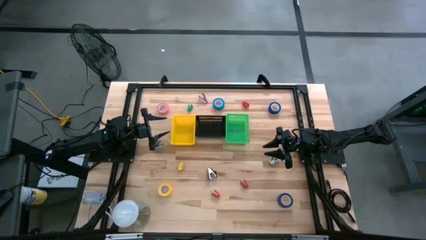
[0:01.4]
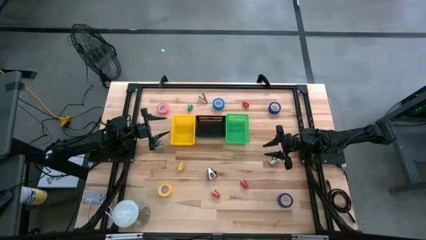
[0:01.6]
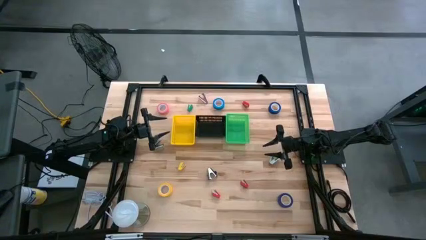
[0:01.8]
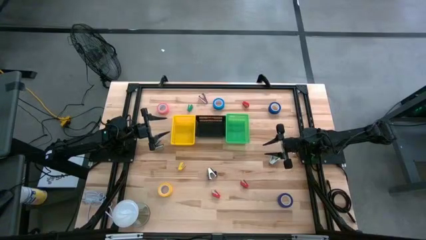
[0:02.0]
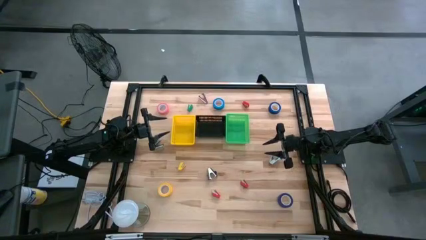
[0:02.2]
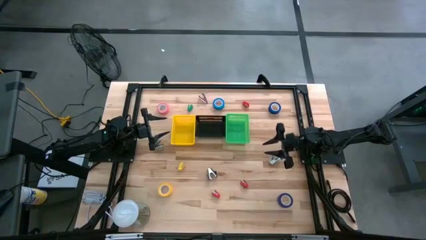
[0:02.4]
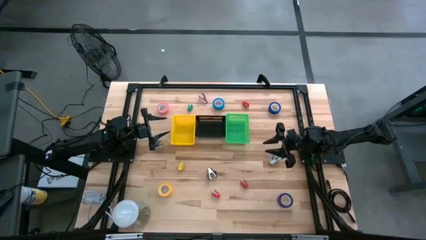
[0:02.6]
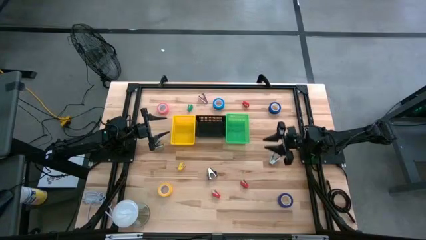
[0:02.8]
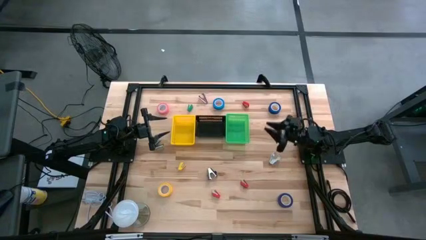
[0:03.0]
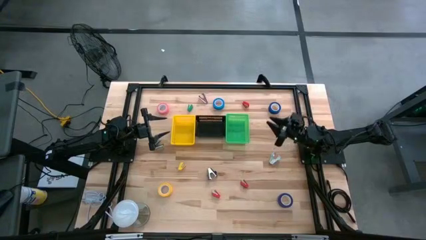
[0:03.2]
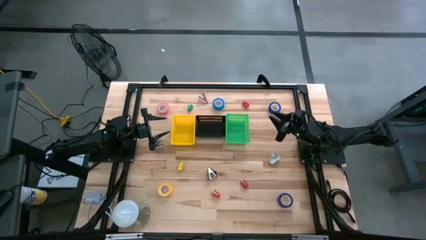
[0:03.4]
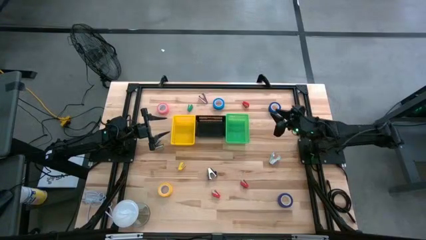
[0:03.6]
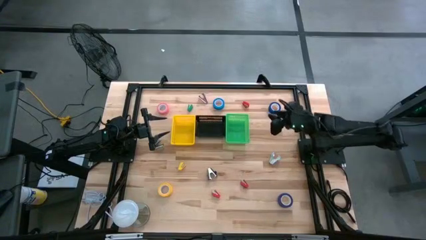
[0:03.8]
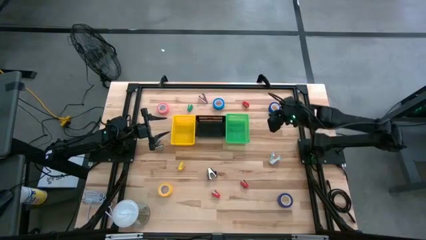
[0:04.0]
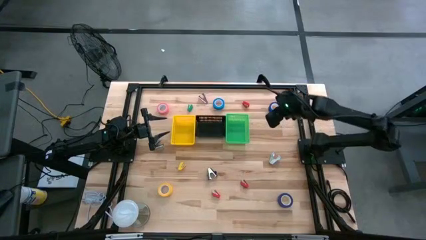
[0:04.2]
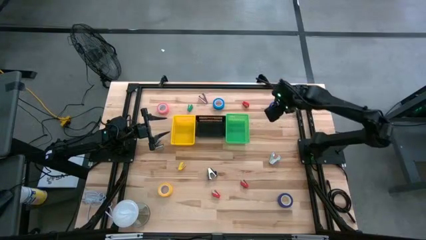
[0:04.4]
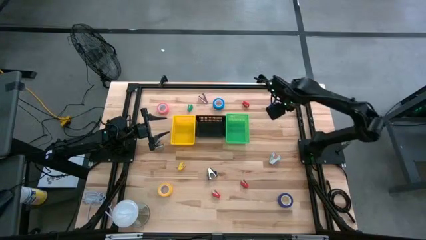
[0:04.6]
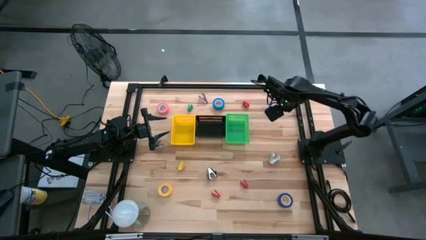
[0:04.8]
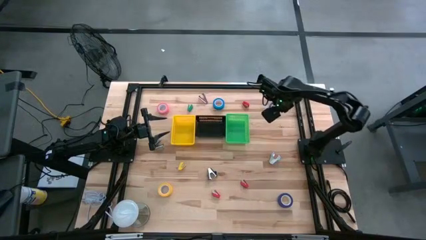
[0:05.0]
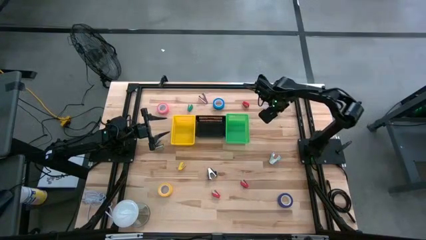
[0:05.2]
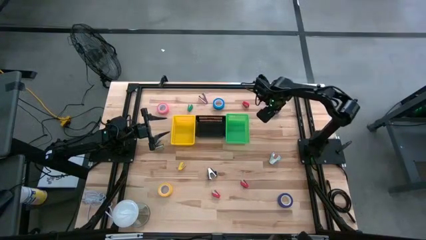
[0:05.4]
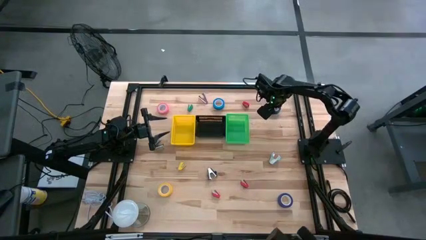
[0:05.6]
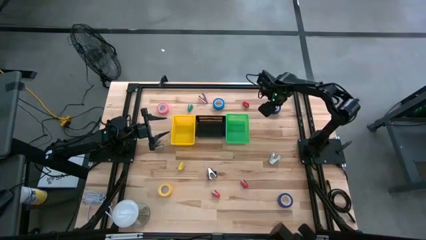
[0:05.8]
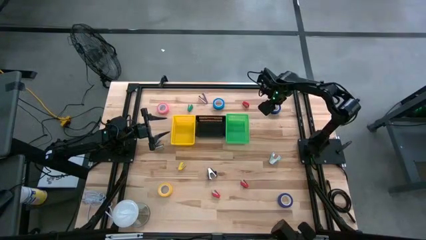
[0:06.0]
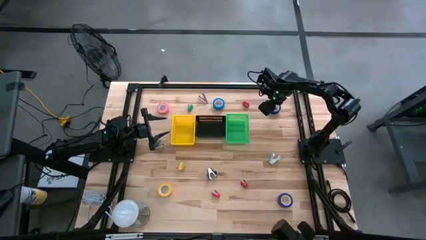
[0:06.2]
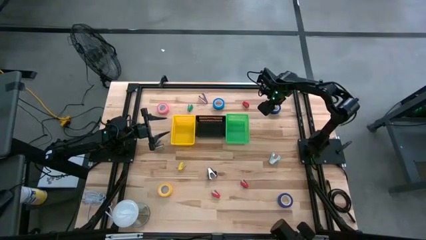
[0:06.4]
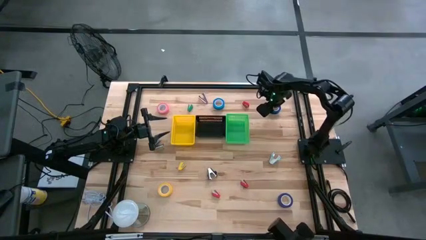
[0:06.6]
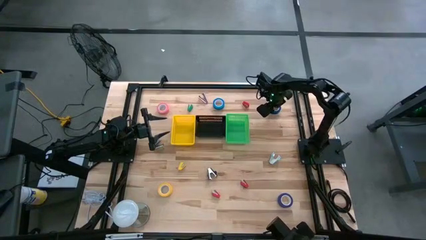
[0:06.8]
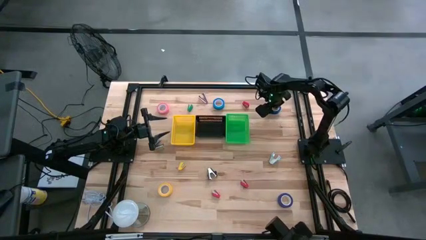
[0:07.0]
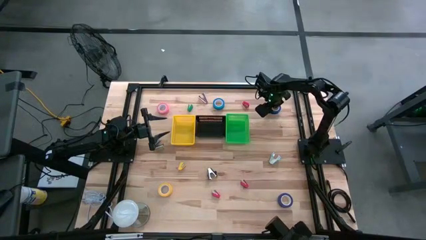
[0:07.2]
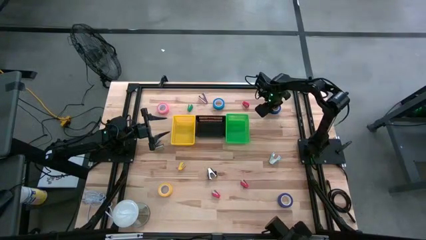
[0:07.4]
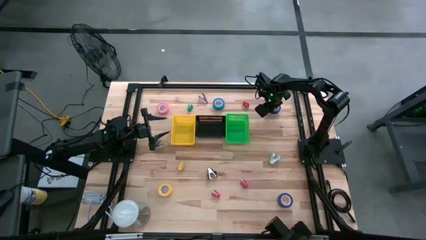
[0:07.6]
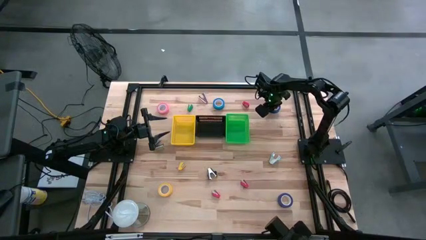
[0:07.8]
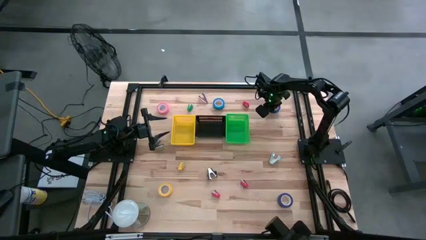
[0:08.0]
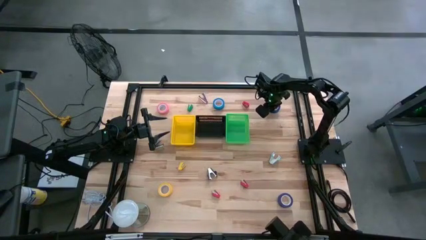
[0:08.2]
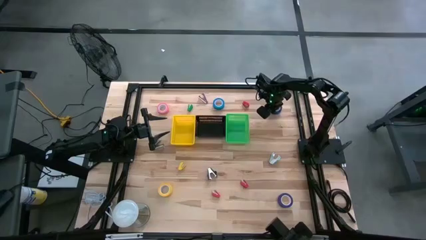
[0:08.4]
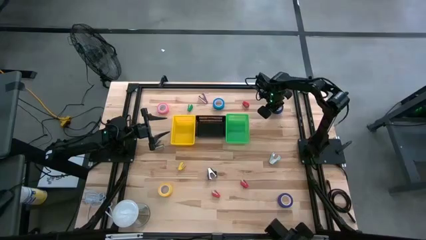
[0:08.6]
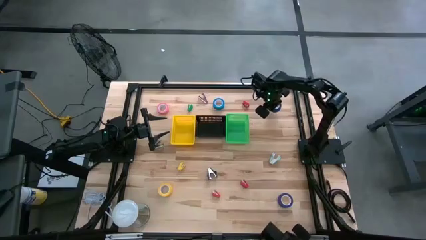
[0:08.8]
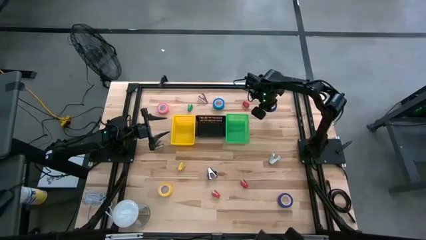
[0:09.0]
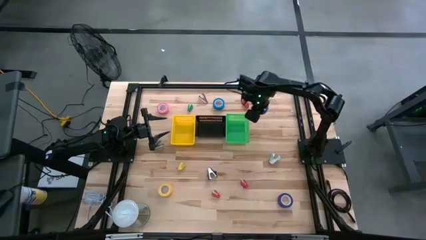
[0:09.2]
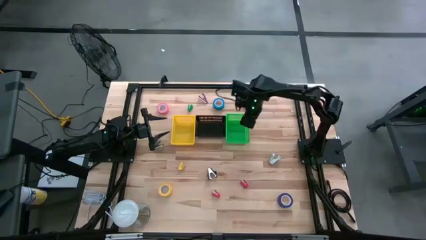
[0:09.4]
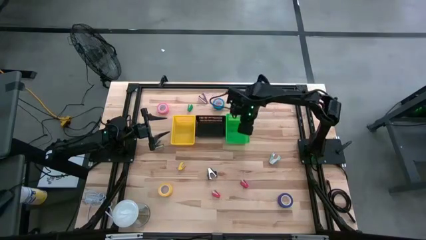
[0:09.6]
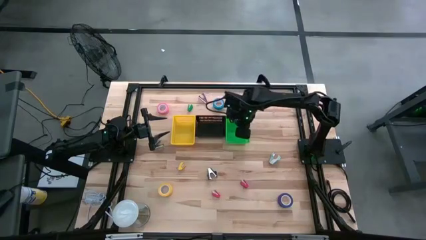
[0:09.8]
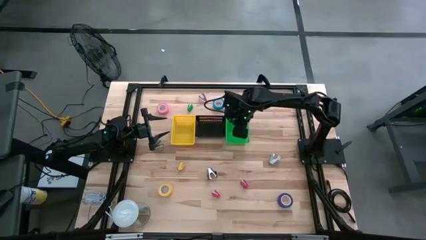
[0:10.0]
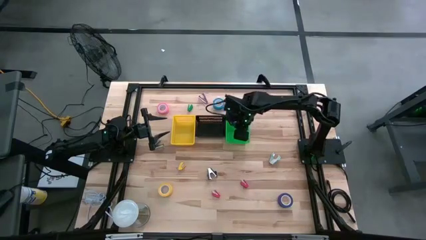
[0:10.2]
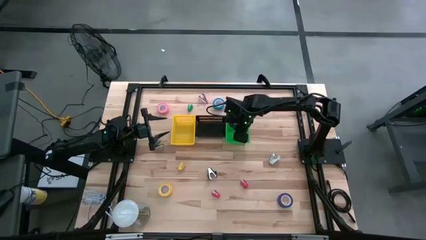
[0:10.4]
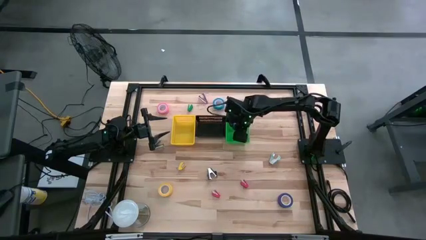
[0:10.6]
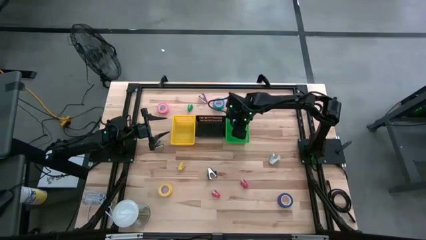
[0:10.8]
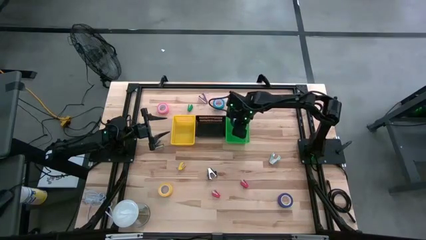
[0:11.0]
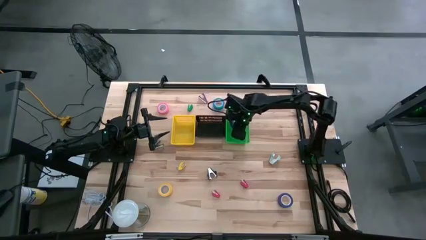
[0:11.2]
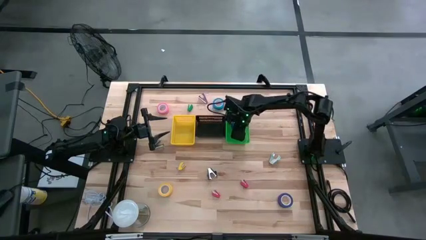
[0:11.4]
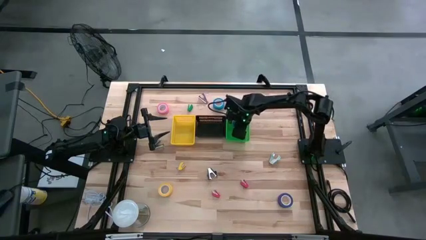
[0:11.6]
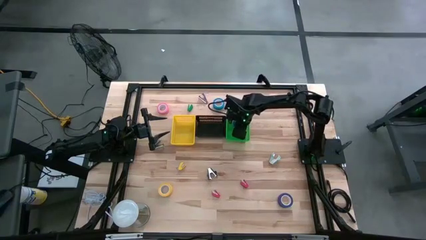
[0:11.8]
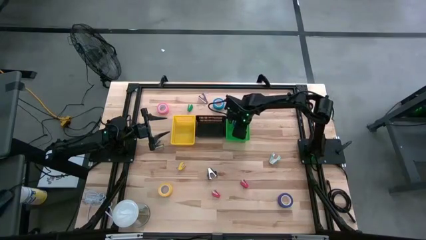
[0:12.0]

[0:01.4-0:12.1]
Task: Pick and place Stapler, Stapler remover, tape
Put the top blue tape into the green bin
